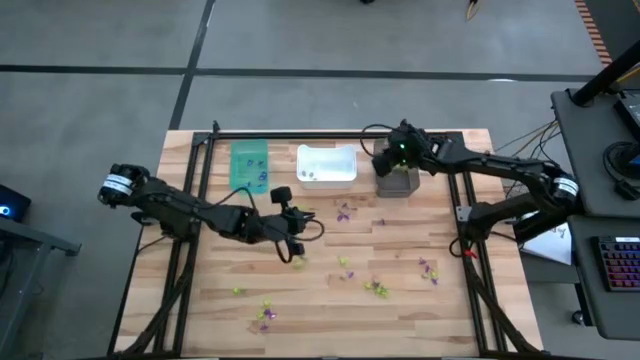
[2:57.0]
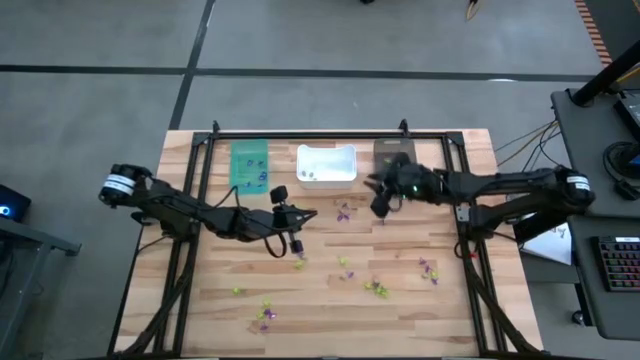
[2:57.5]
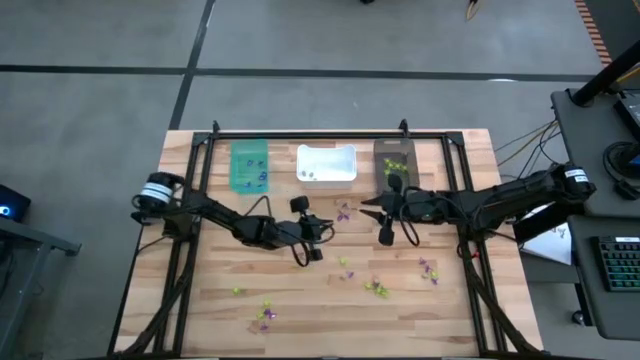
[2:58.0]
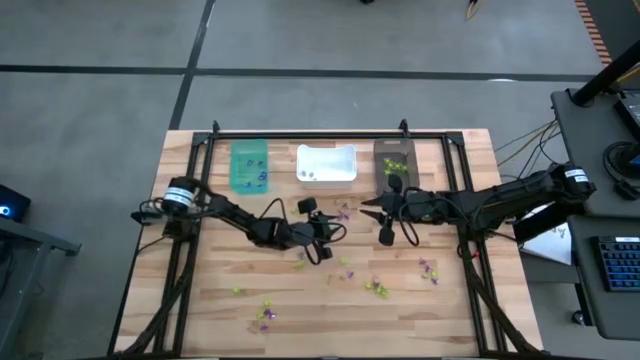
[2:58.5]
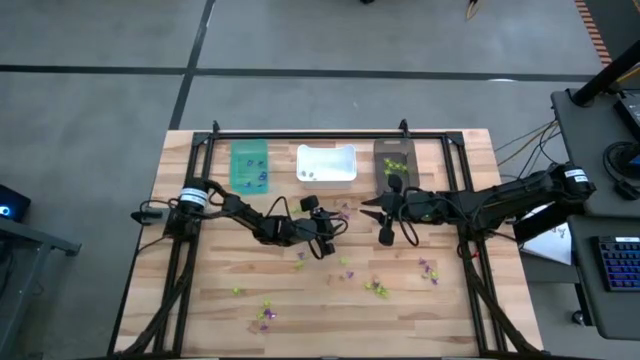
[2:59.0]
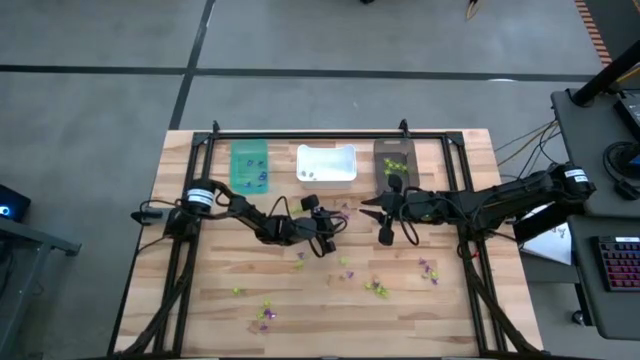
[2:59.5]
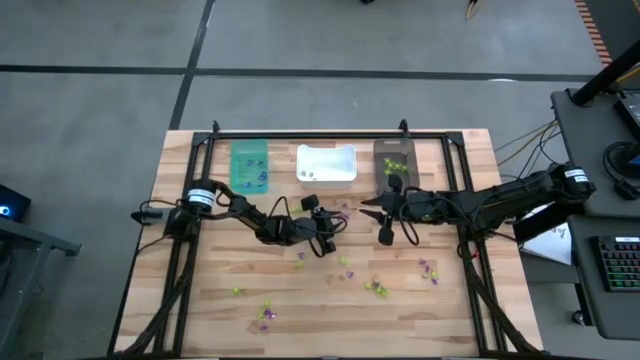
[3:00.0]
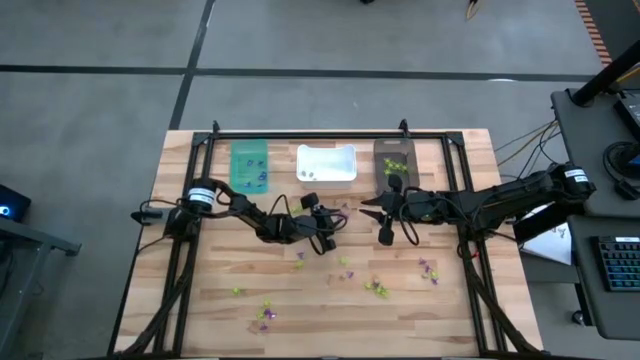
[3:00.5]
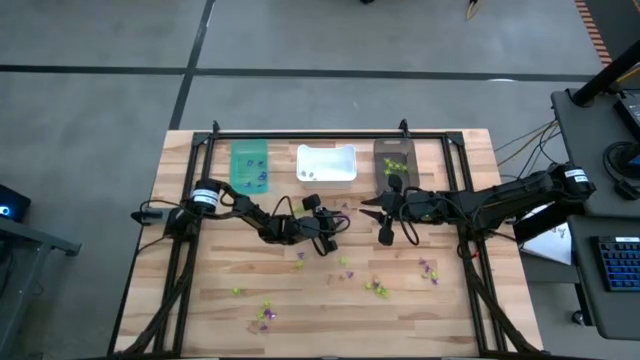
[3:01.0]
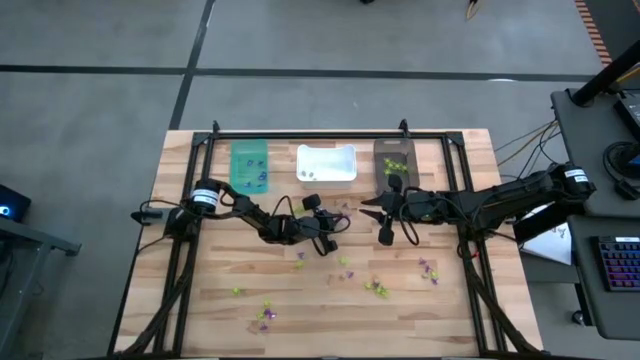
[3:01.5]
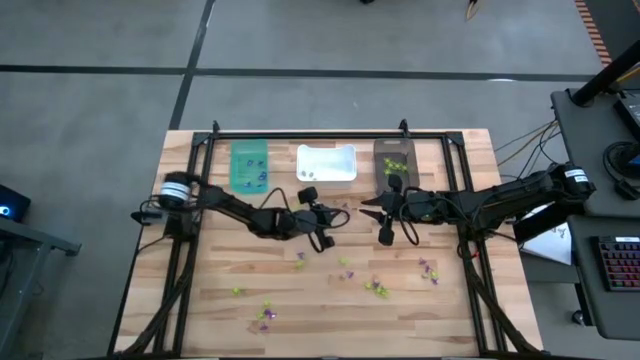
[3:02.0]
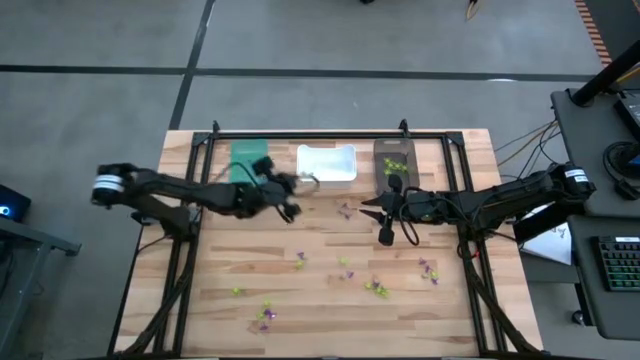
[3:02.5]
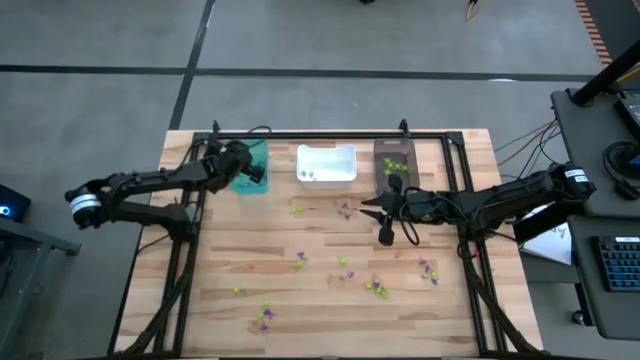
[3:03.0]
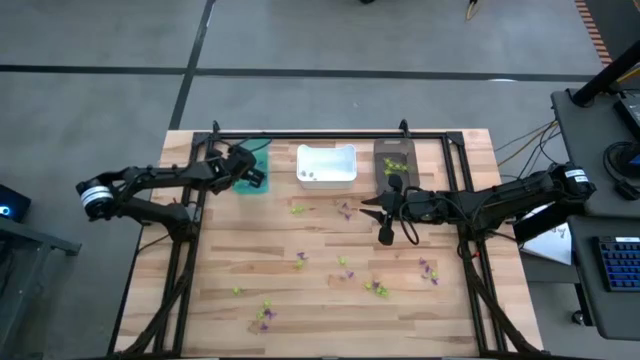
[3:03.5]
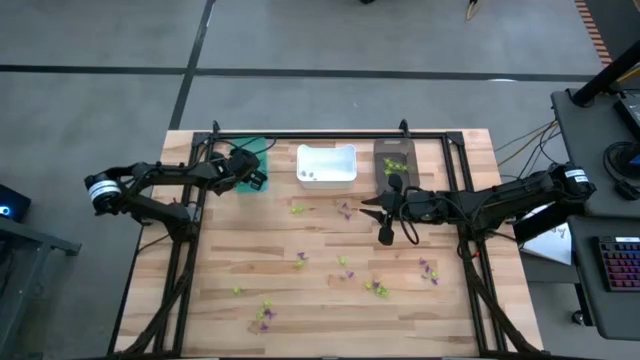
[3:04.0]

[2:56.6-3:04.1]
Task: Sort Halloween decoration
Put the purple witch hat toy into the light blue bin

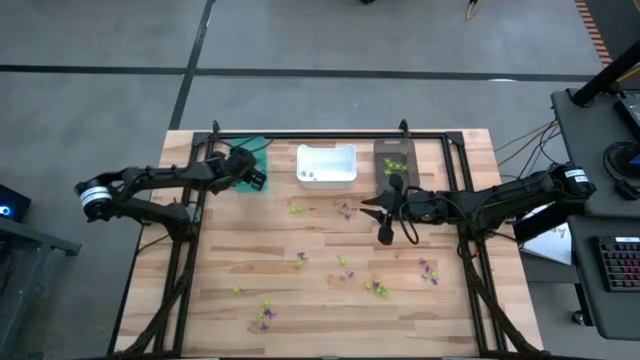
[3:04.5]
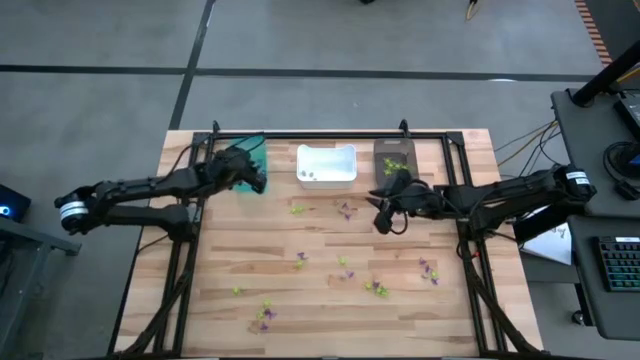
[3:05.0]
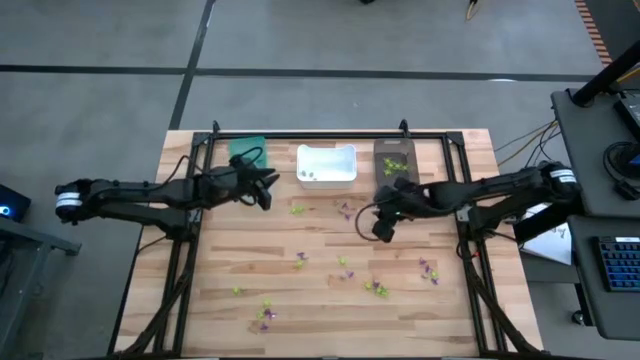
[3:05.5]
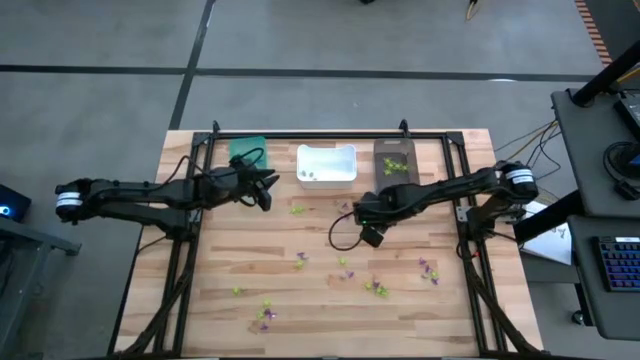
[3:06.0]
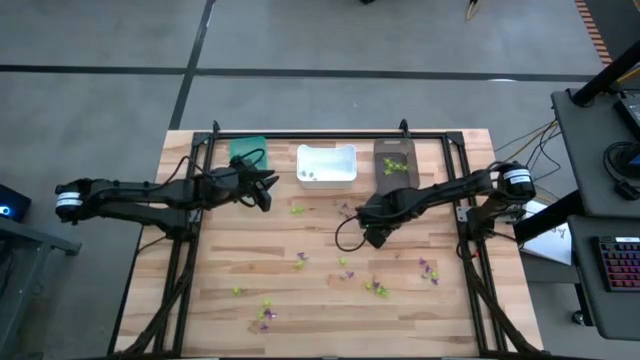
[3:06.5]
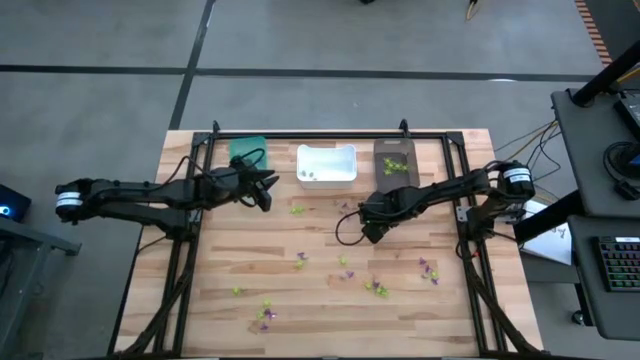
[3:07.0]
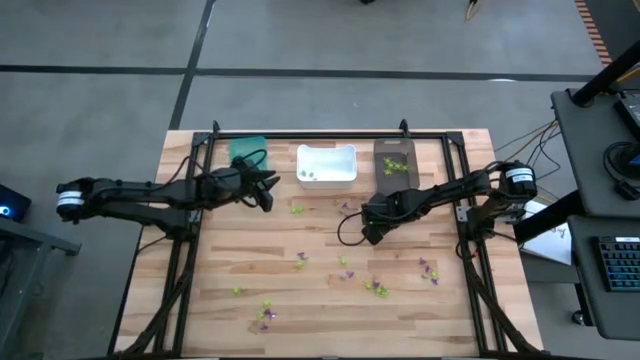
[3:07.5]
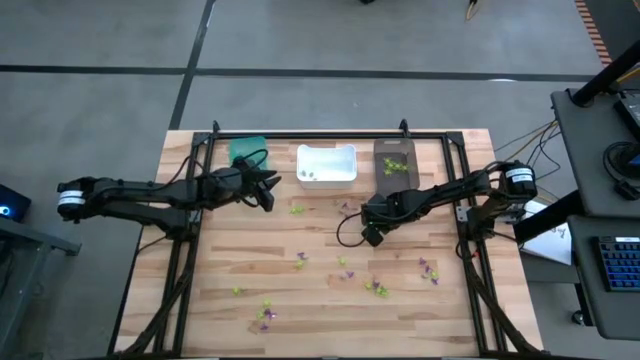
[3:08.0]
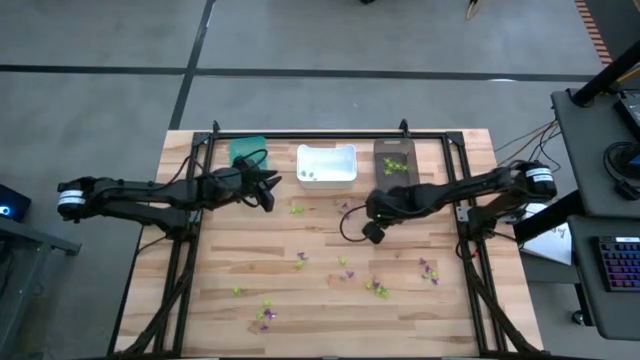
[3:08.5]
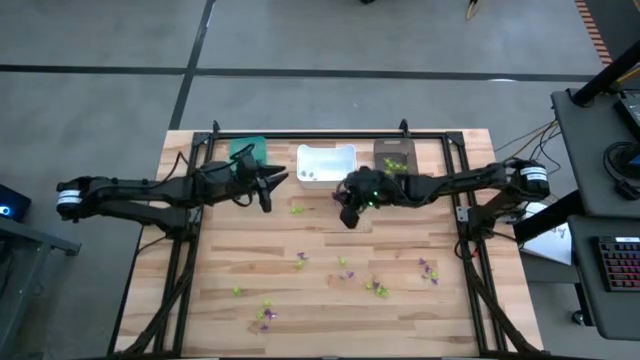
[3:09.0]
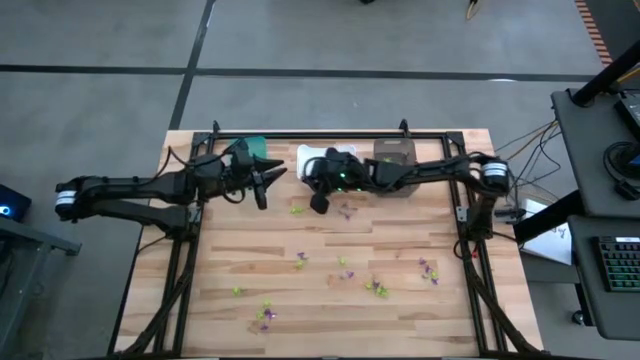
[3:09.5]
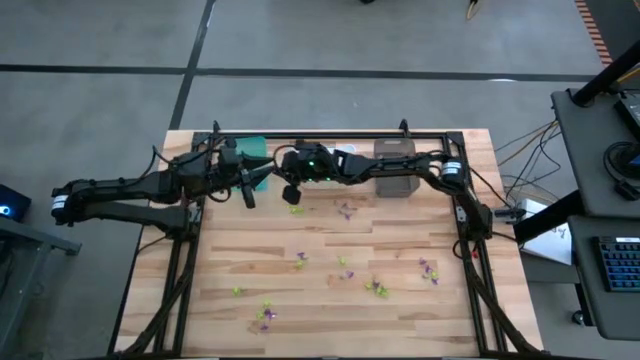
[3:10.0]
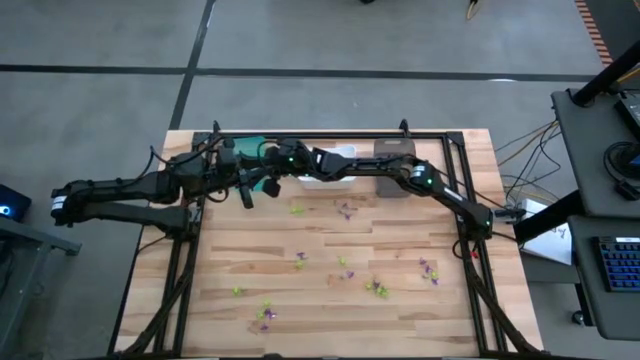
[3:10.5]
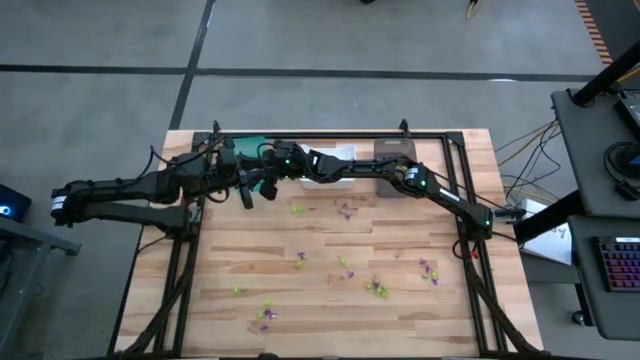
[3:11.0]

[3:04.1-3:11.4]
Put the purple witch hat toy into the light blue bin

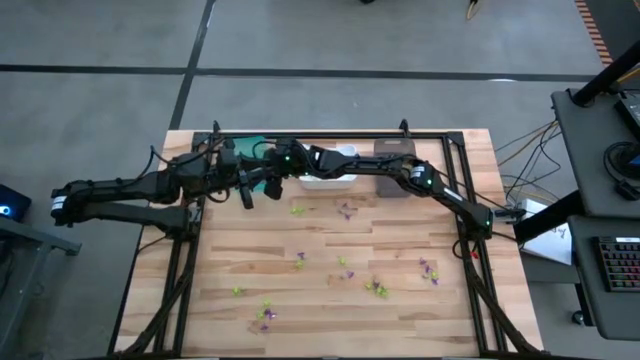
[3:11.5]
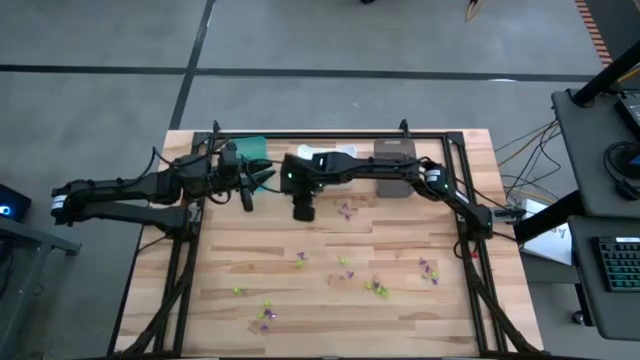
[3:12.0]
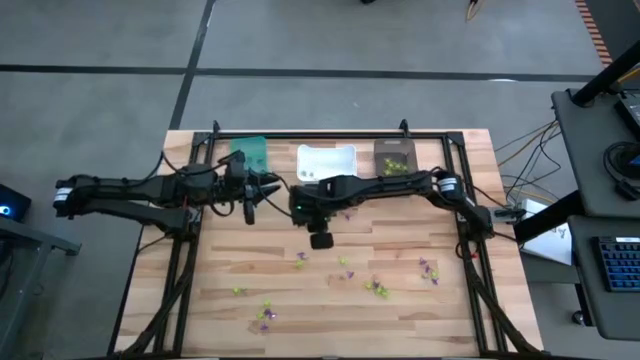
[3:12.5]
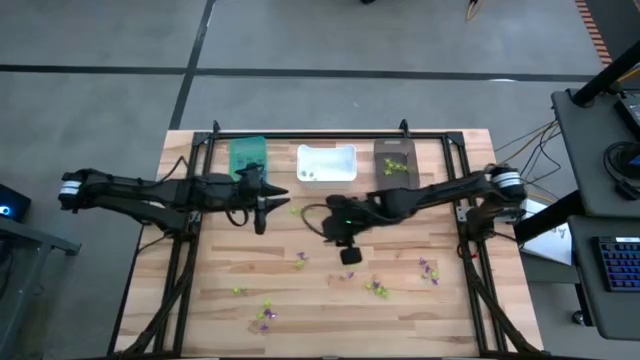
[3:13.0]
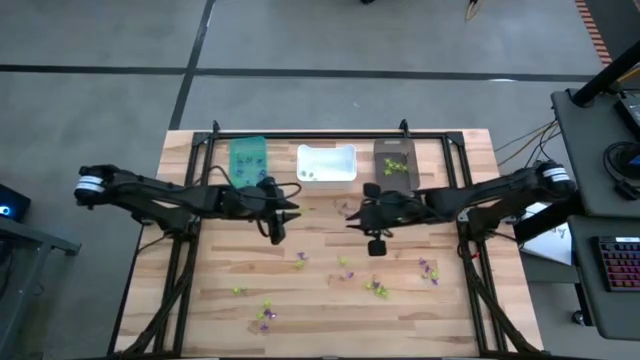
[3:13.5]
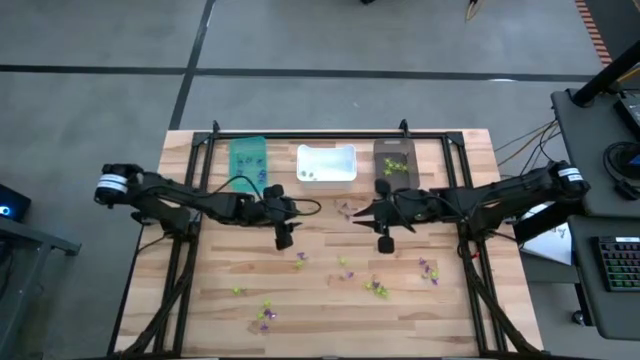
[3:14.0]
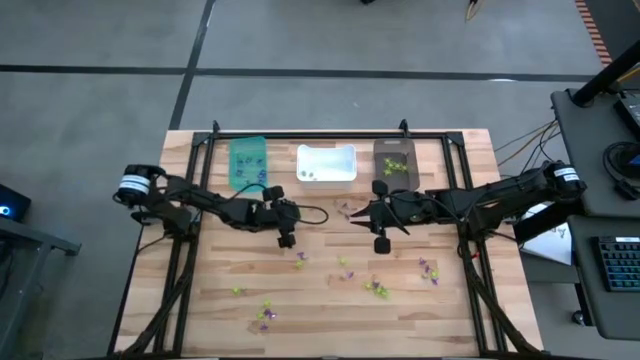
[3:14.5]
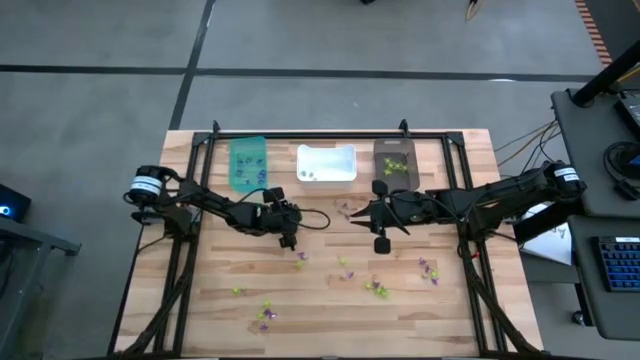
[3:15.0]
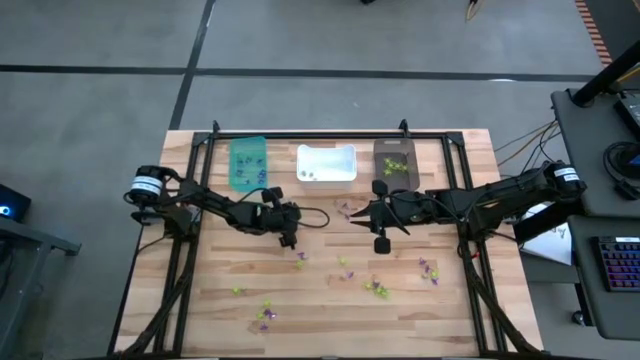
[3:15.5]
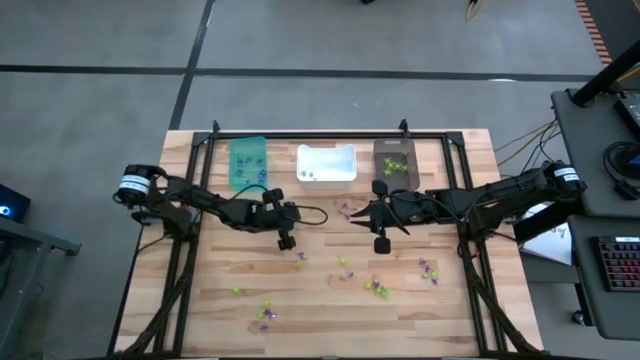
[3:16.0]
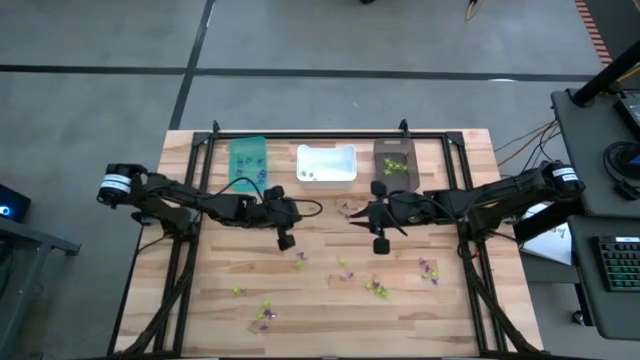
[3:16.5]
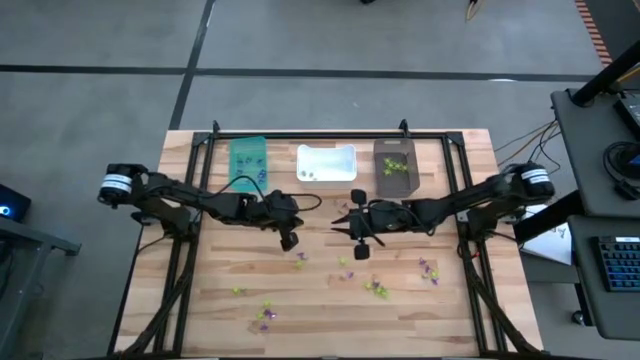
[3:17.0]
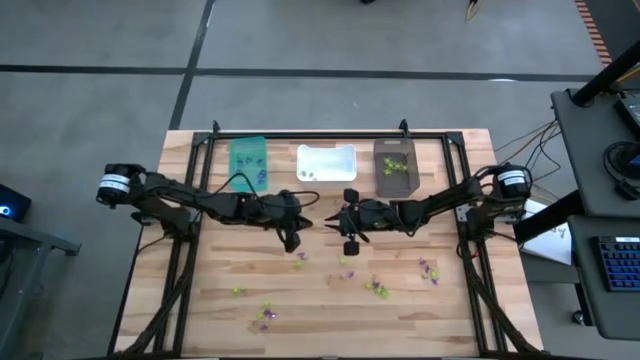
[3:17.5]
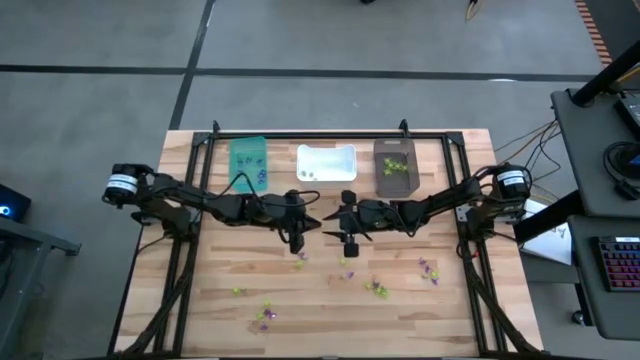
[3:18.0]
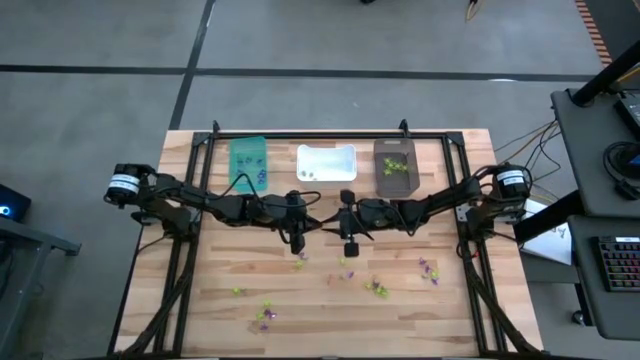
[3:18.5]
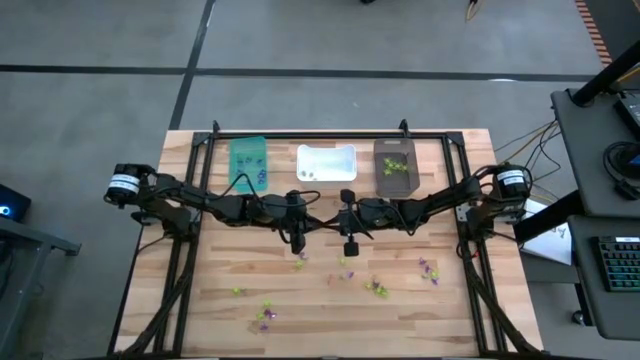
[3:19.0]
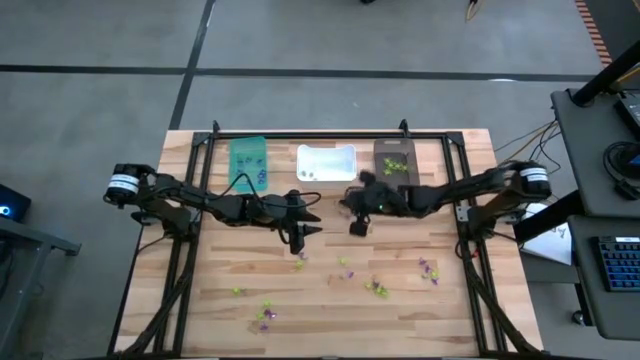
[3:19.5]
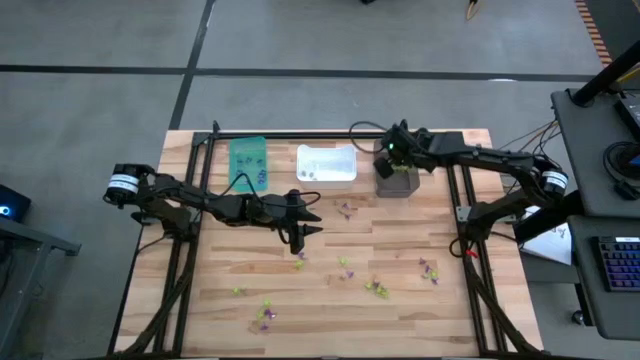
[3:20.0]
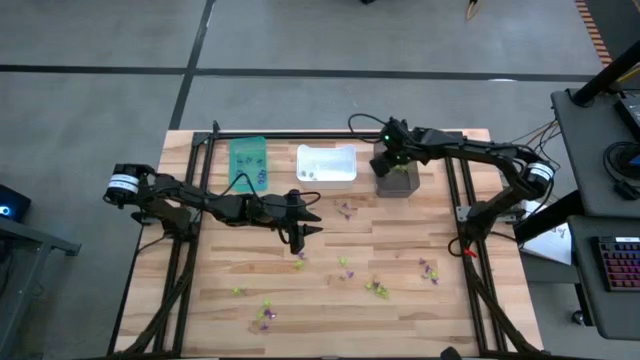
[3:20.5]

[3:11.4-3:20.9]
Put the green spider toy into the black bin
